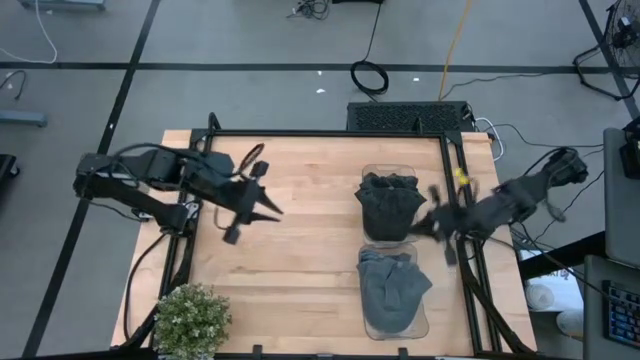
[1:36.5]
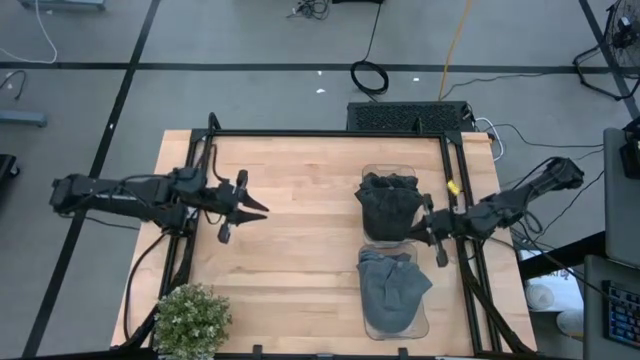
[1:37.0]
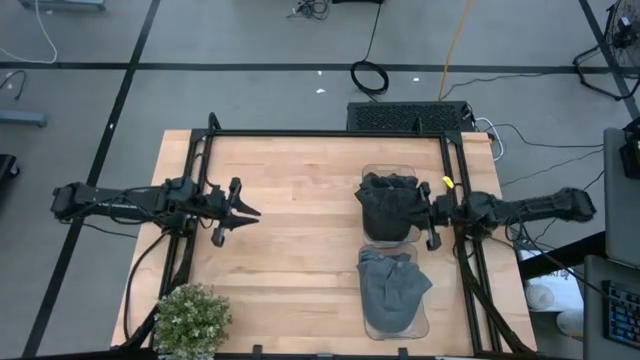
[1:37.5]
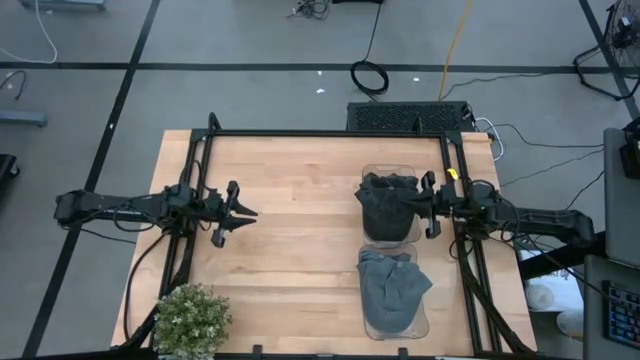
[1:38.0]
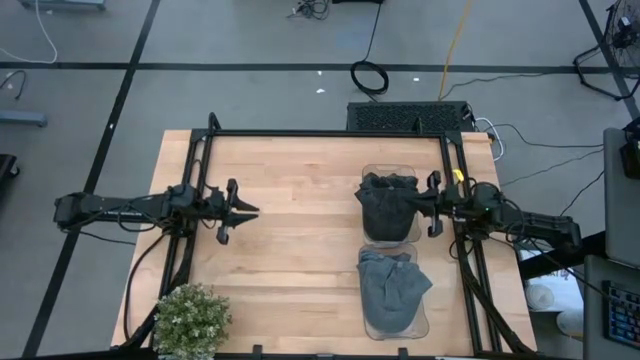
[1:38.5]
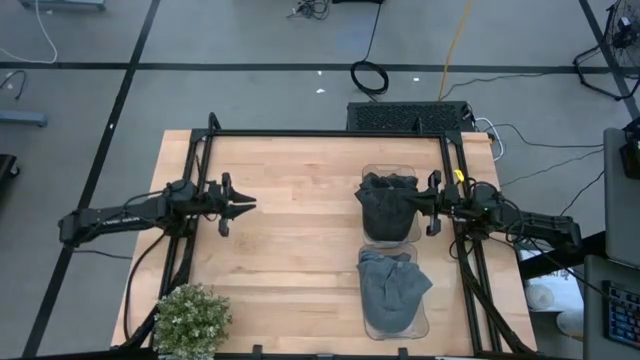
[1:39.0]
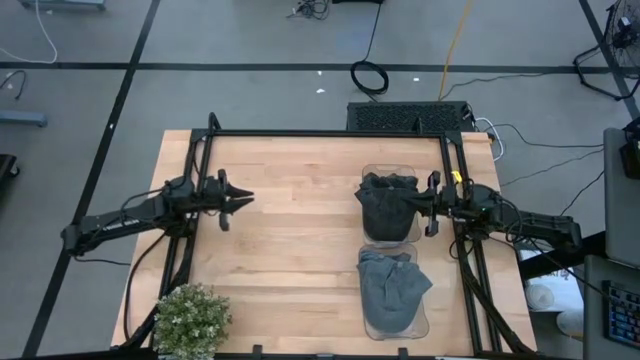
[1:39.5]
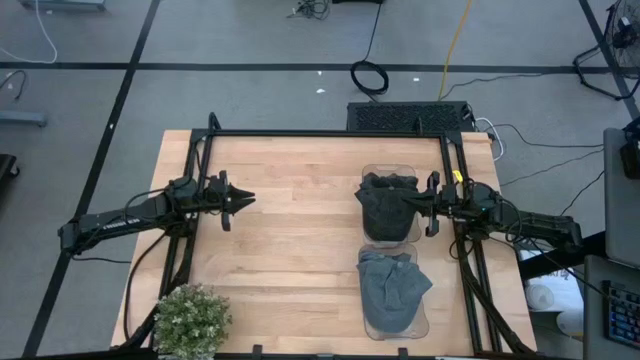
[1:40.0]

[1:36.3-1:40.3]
Task: Pick & Place hat
Return to Home Position

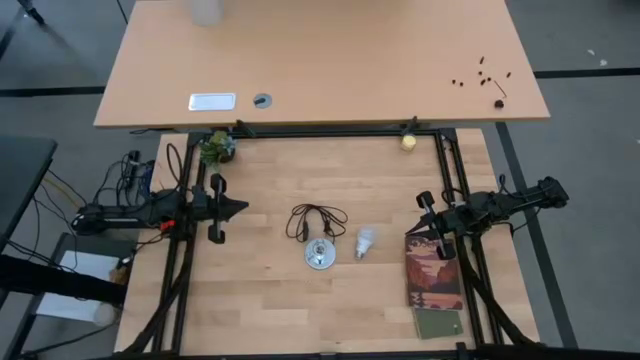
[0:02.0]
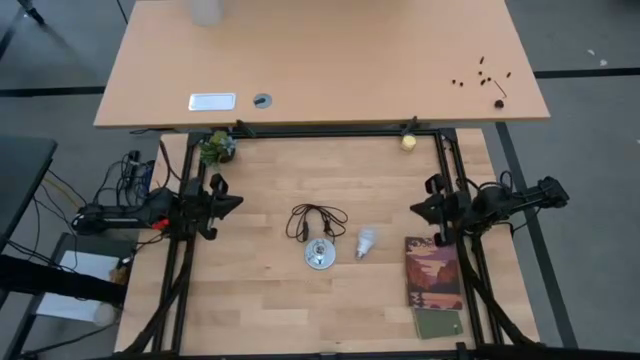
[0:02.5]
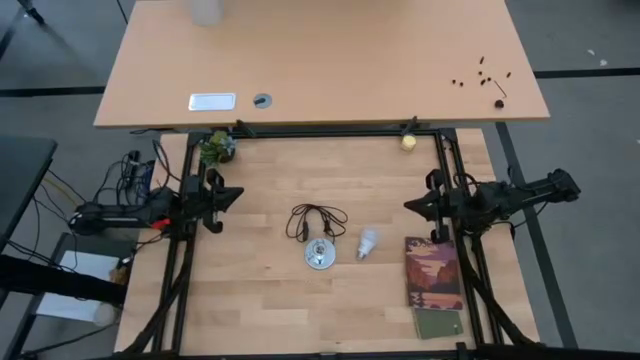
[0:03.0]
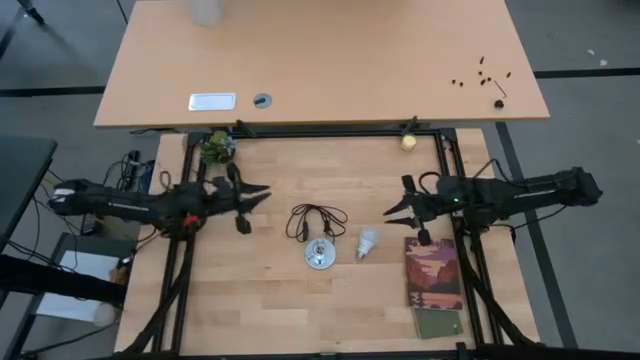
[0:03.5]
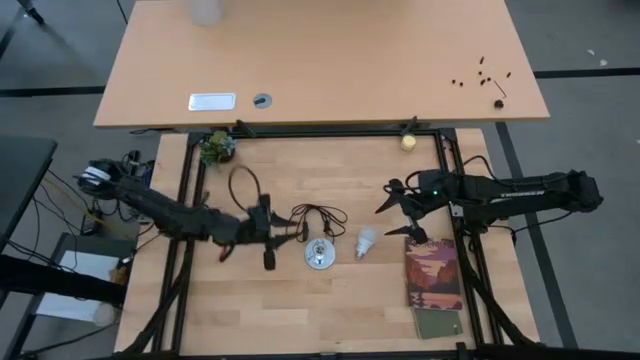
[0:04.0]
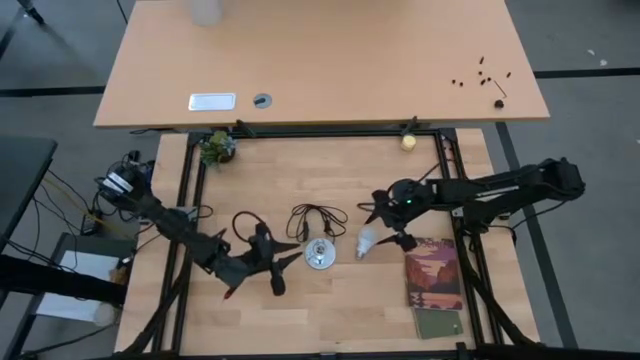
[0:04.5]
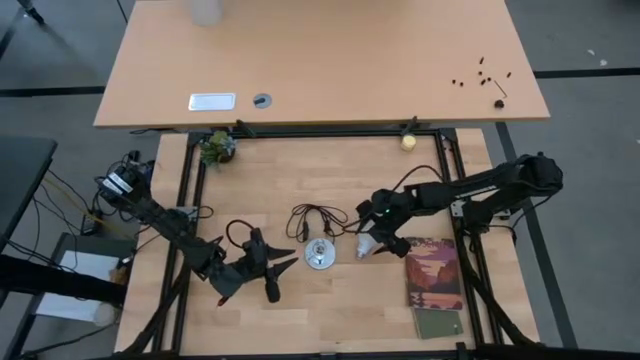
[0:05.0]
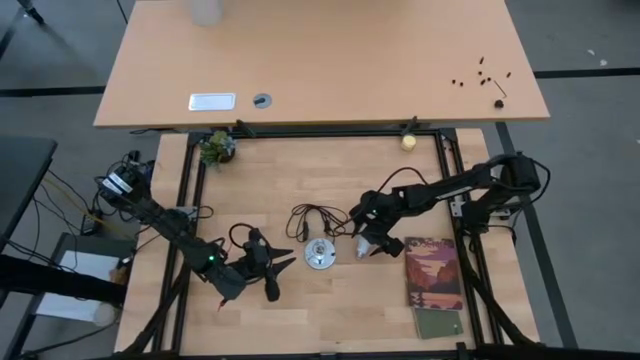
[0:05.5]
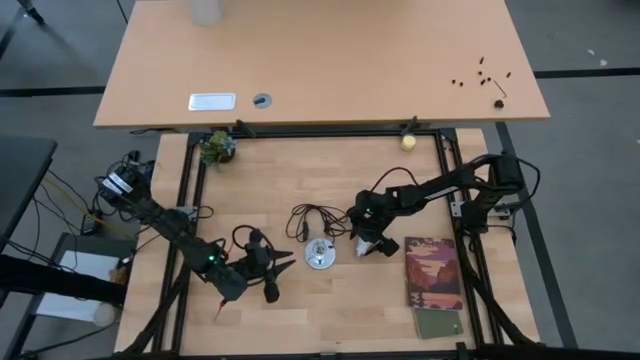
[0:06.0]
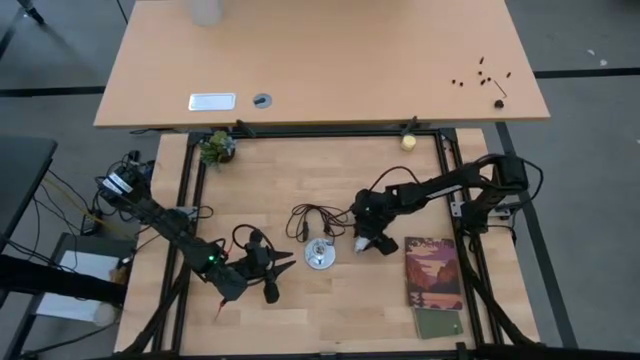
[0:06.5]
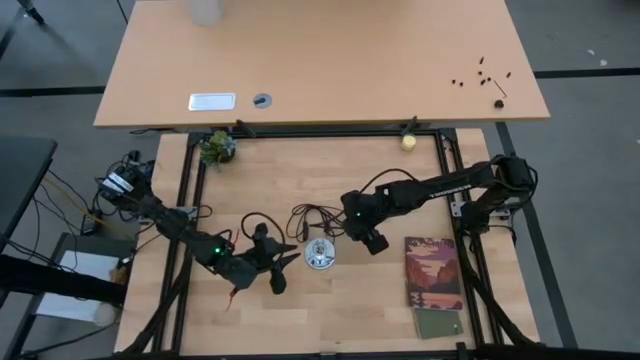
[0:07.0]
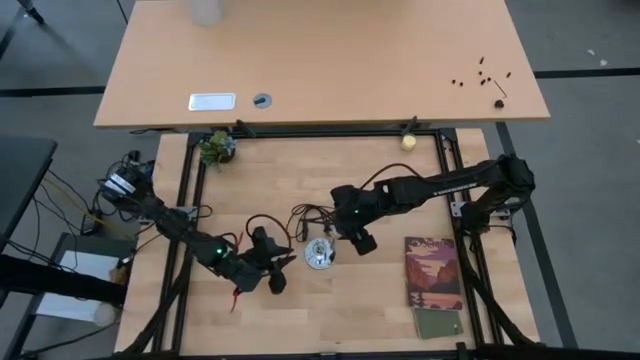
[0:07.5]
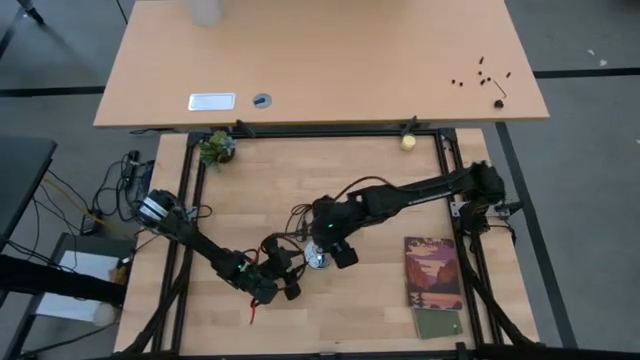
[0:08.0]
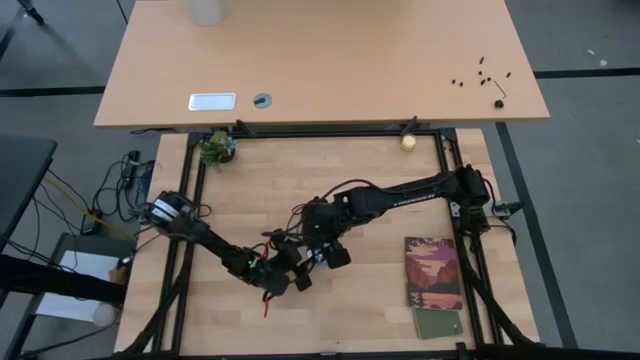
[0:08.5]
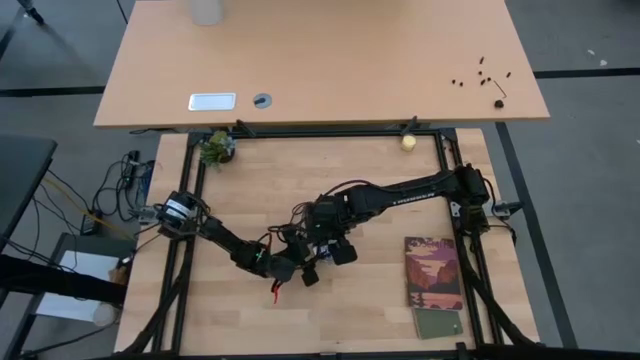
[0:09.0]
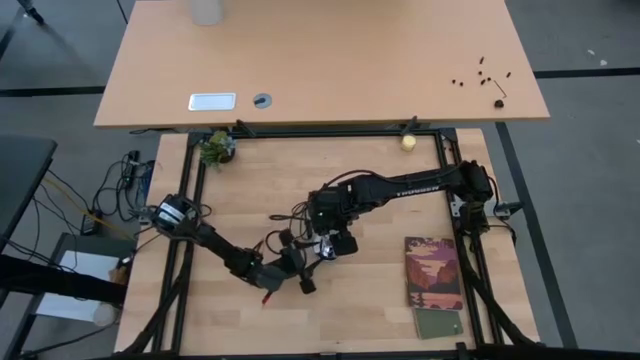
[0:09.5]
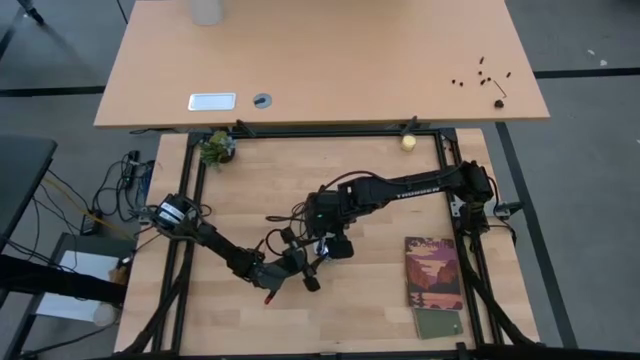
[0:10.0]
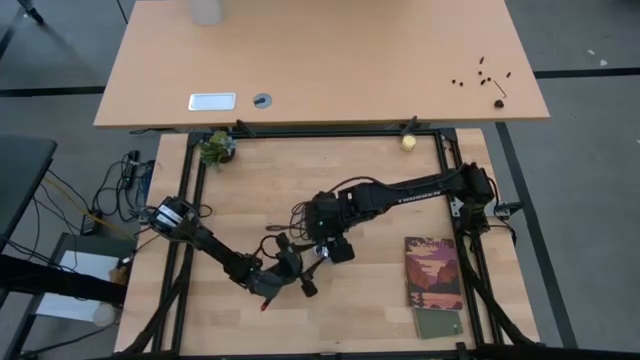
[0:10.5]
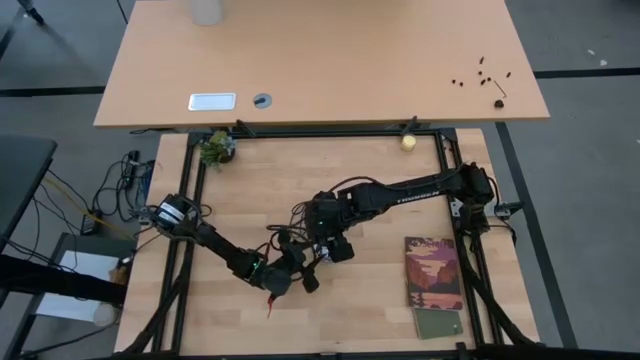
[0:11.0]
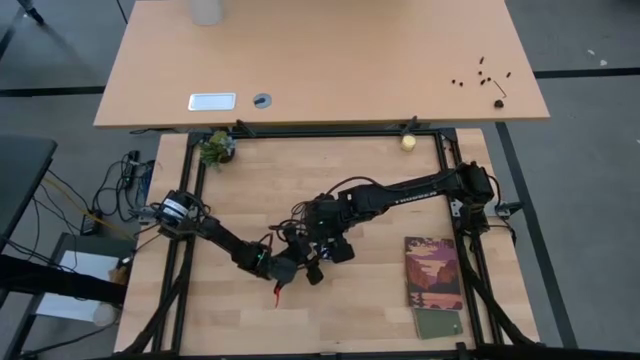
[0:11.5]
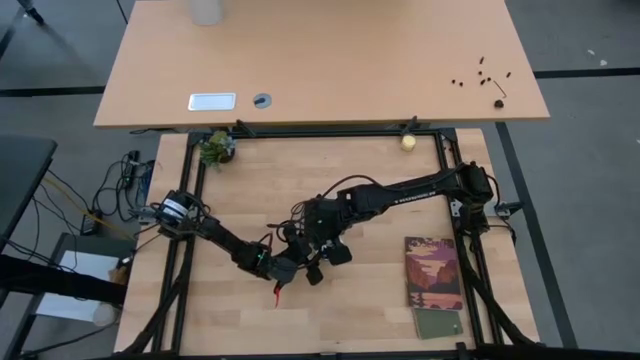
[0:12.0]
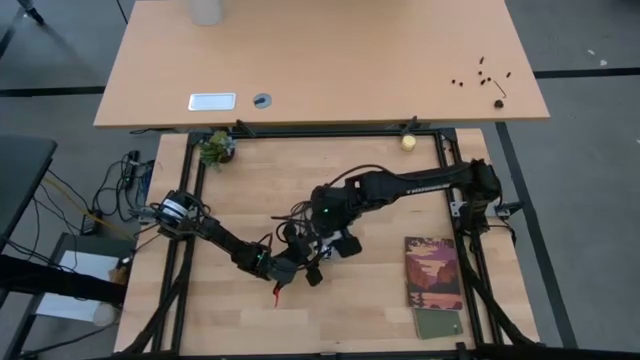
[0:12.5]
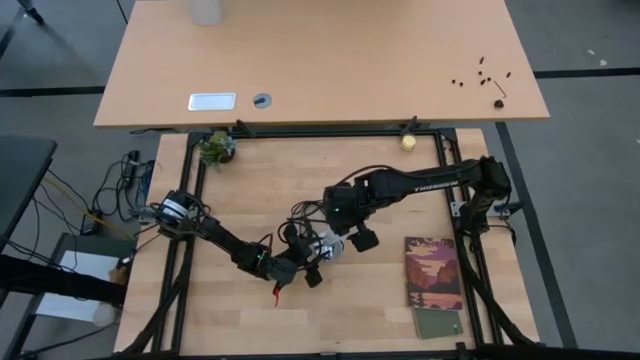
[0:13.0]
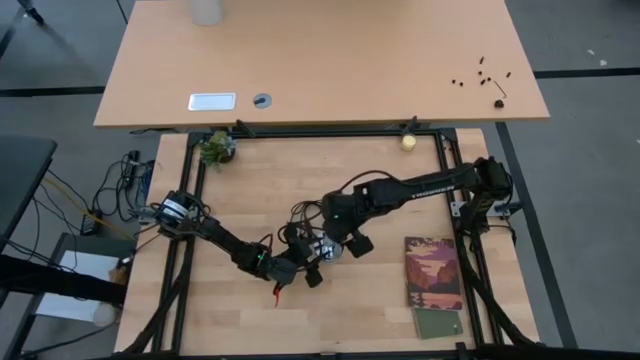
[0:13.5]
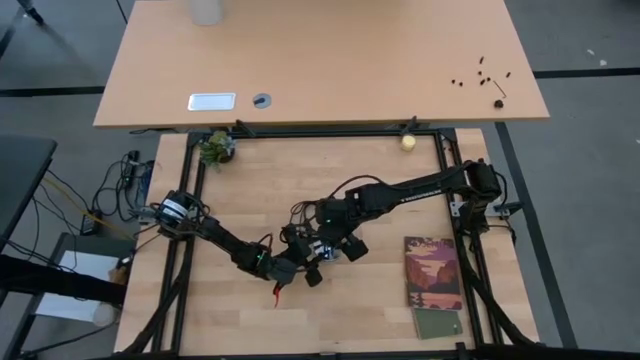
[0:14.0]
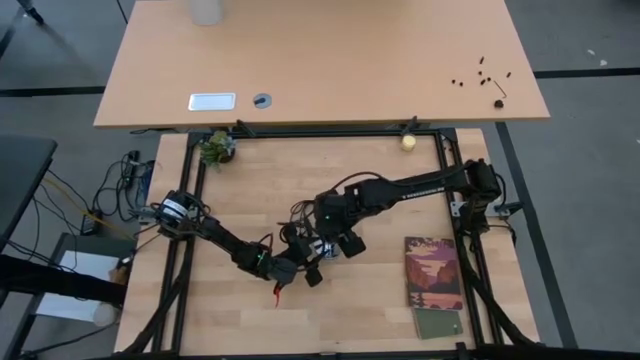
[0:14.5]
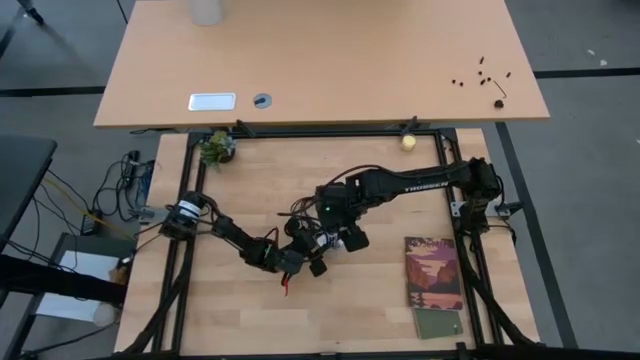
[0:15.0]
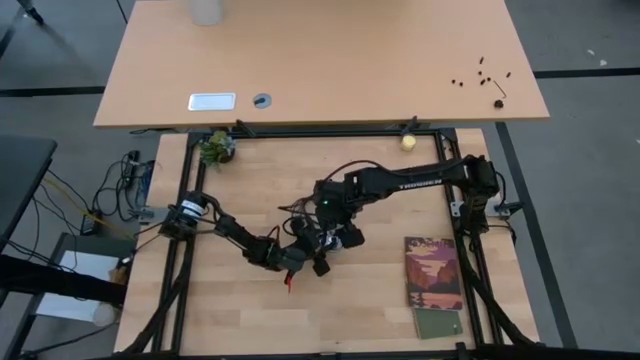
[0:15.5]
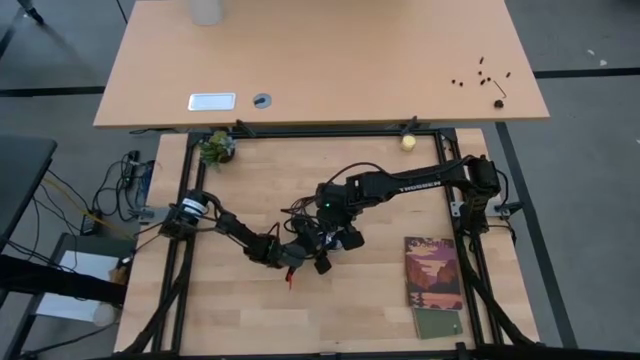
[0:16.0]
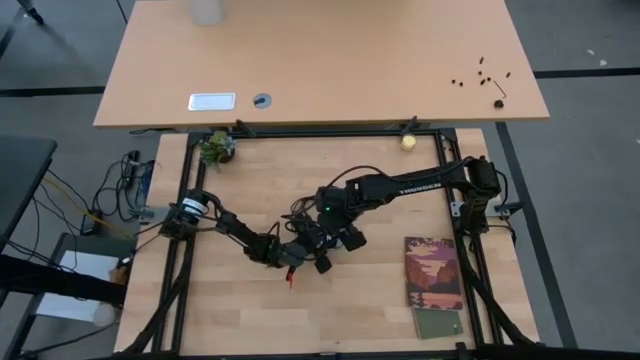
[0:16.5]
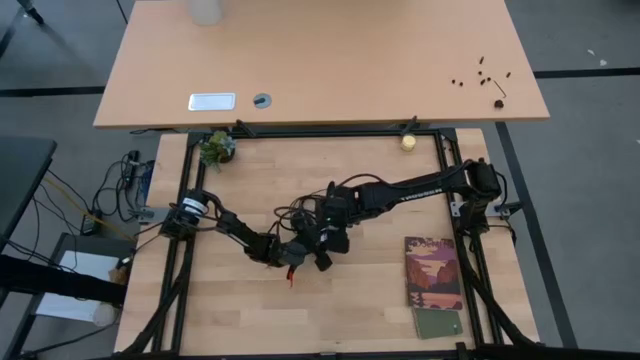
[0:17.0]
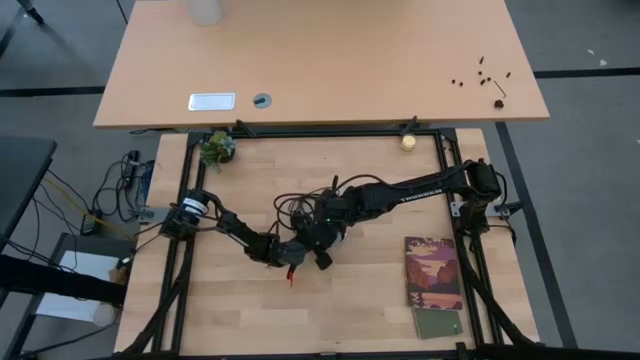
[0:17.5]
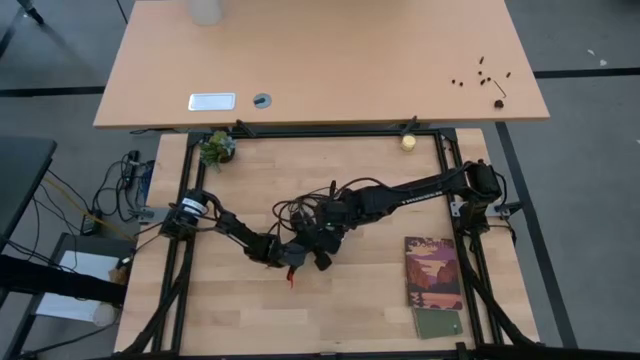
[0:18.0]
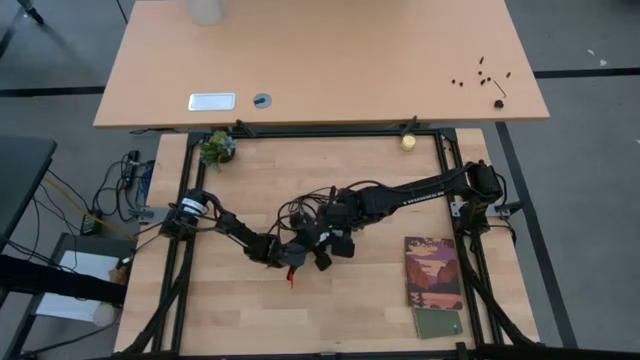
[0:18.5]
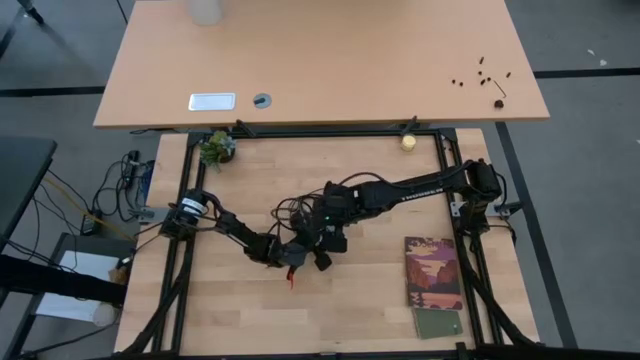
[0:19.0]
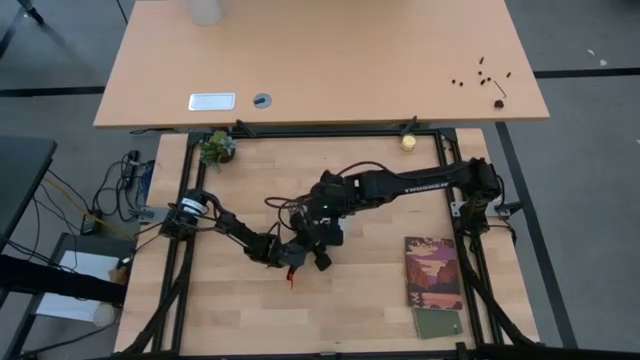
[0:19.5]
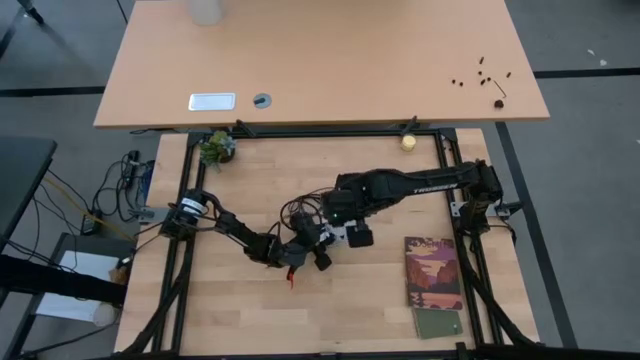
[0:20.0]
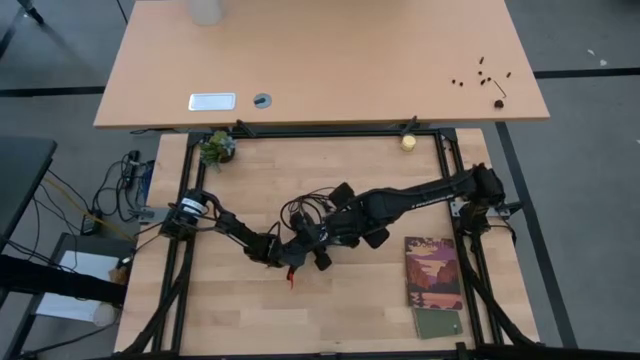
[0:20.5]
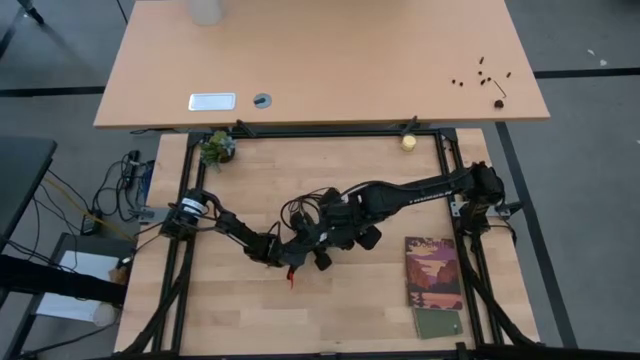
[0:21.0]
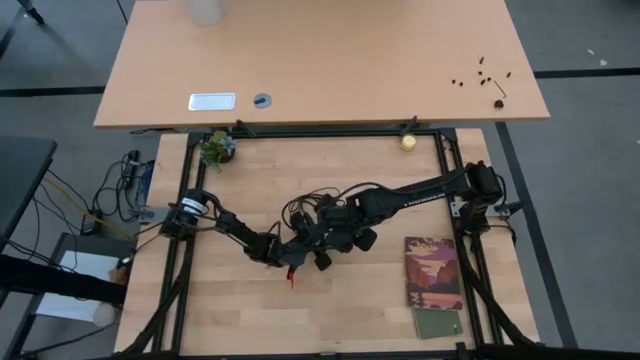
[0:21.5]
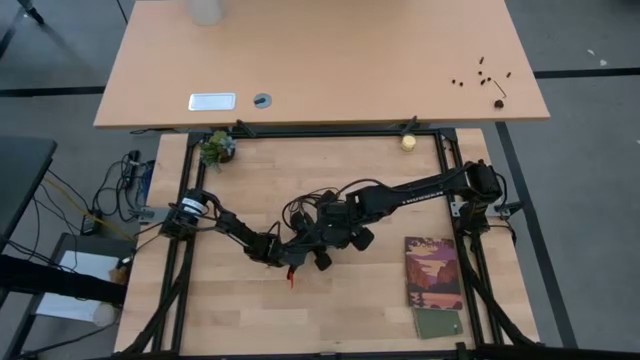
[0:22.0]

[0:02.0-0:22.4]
Task: Screw lightbulb
Insert the white lightbulb into the silver lamp
